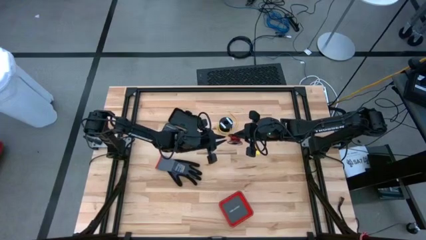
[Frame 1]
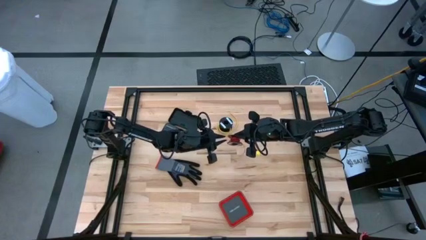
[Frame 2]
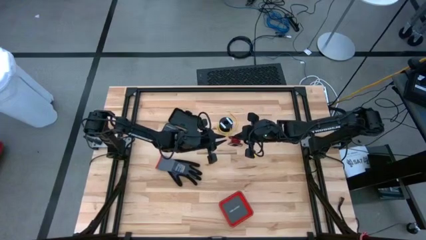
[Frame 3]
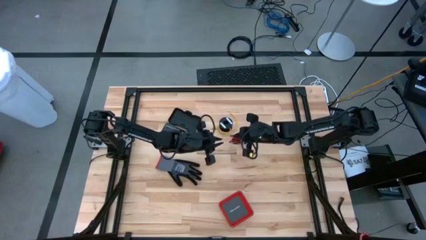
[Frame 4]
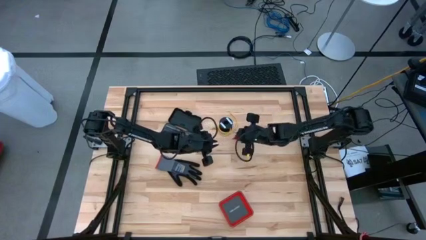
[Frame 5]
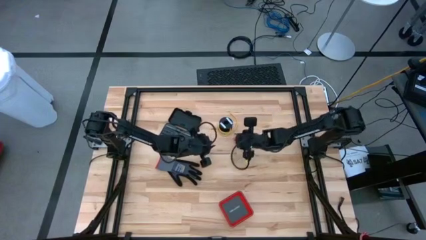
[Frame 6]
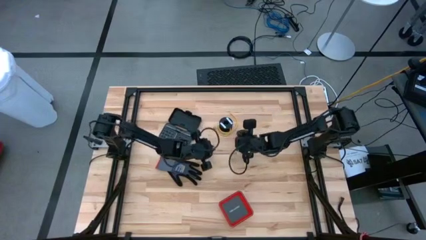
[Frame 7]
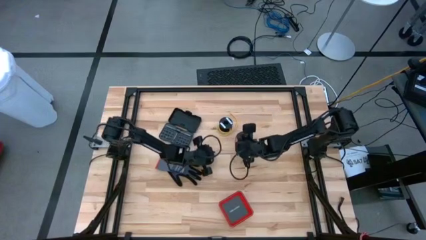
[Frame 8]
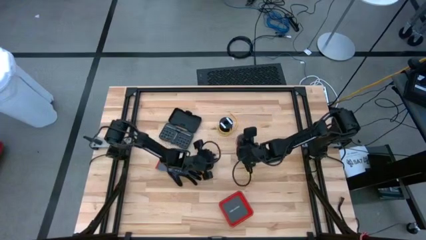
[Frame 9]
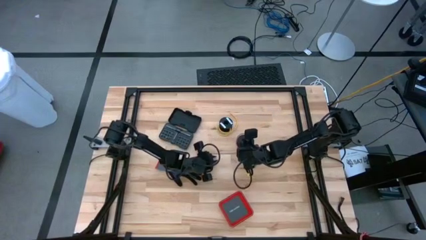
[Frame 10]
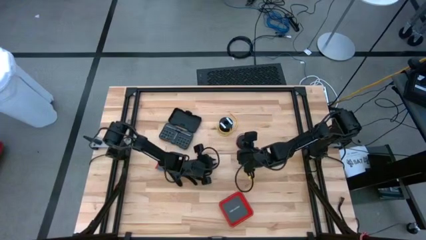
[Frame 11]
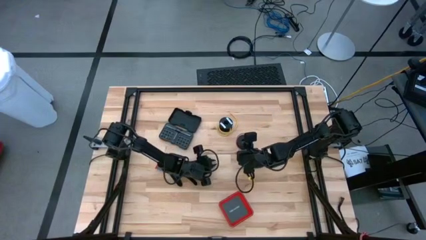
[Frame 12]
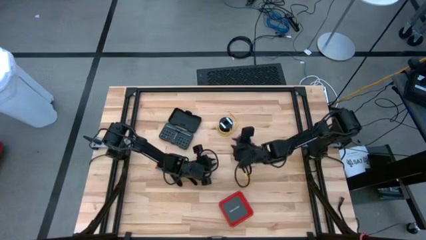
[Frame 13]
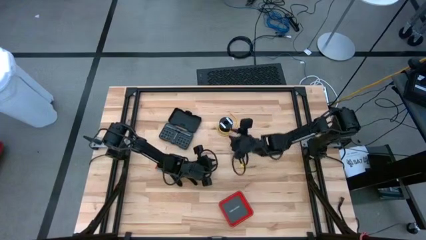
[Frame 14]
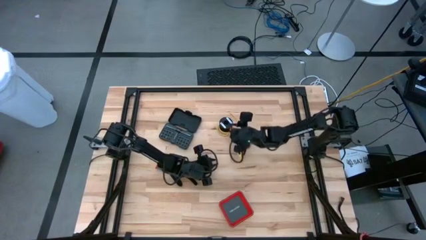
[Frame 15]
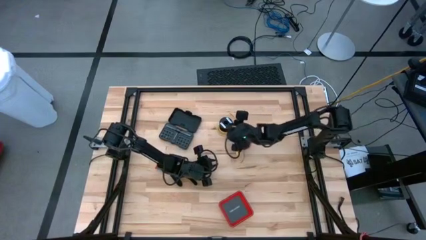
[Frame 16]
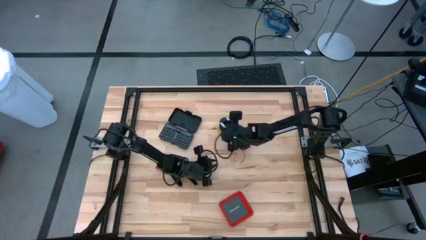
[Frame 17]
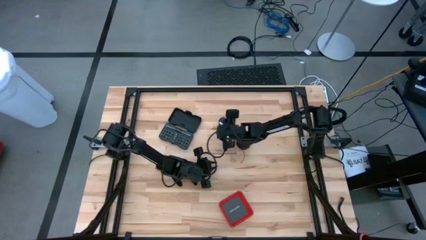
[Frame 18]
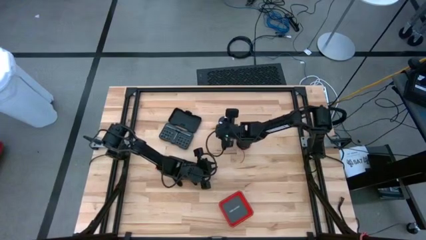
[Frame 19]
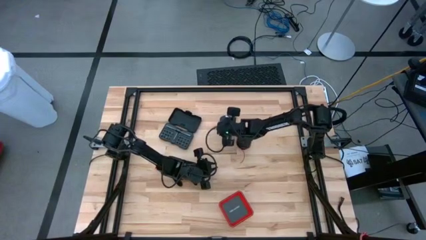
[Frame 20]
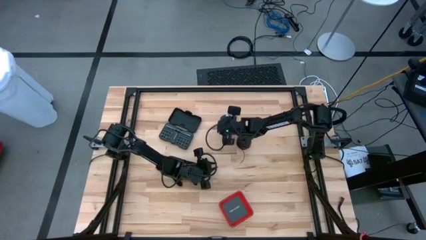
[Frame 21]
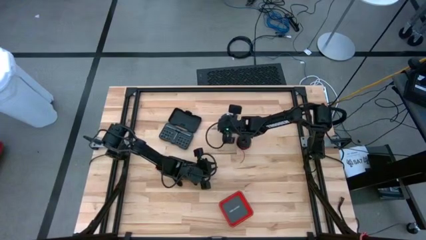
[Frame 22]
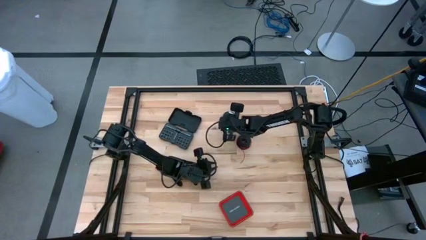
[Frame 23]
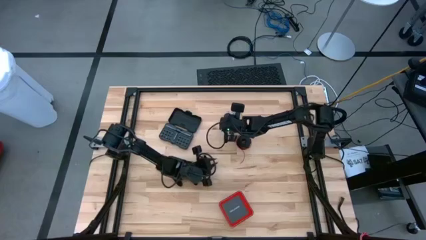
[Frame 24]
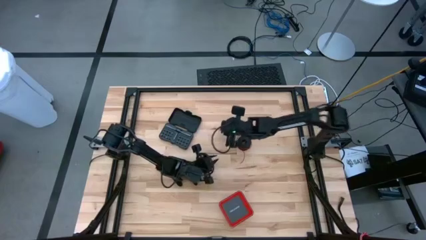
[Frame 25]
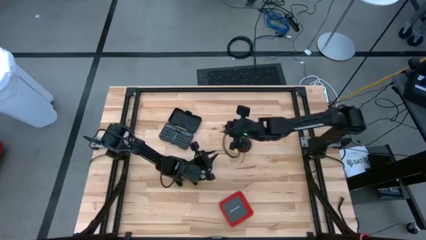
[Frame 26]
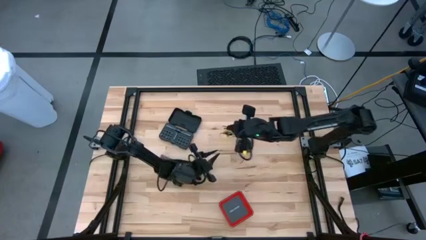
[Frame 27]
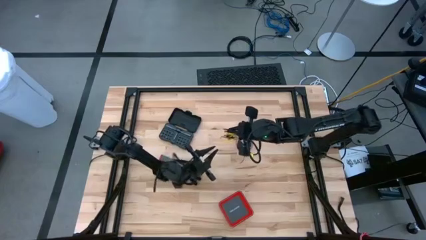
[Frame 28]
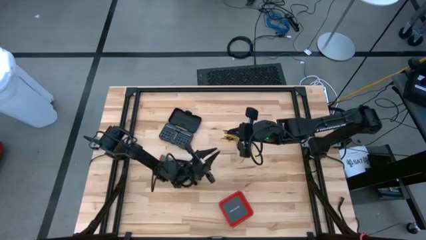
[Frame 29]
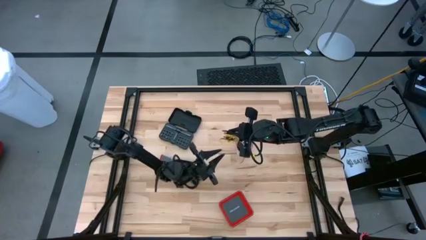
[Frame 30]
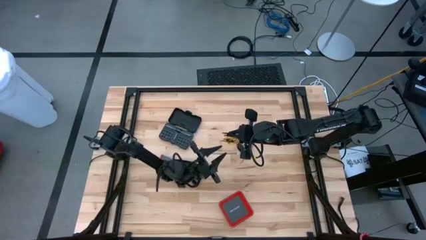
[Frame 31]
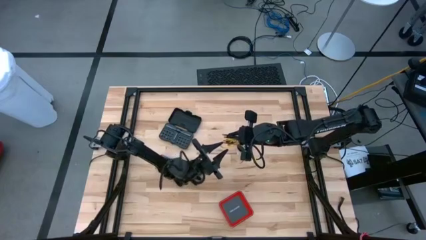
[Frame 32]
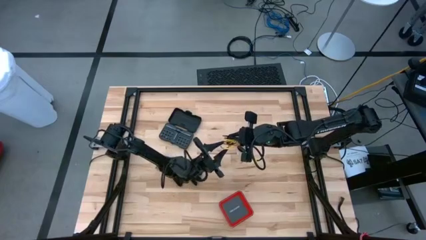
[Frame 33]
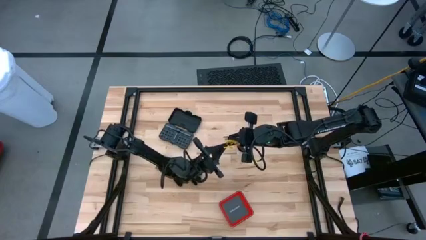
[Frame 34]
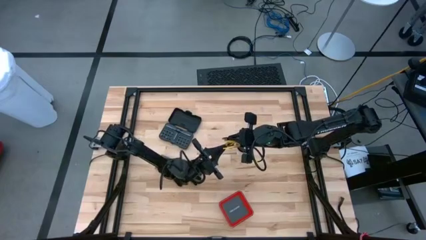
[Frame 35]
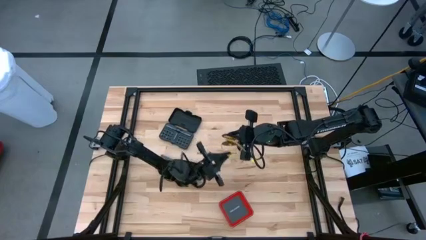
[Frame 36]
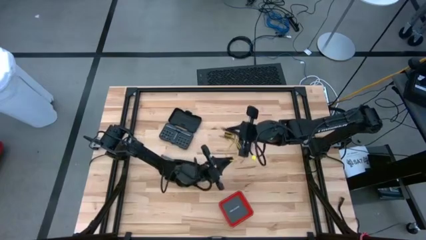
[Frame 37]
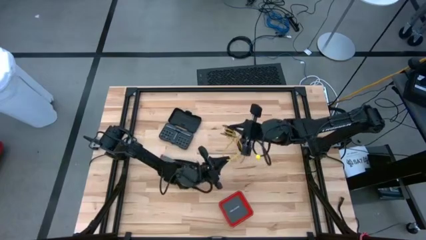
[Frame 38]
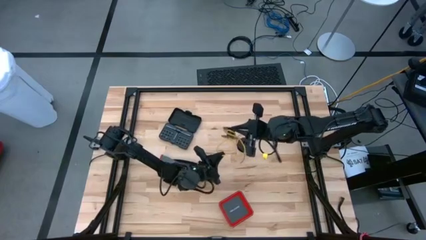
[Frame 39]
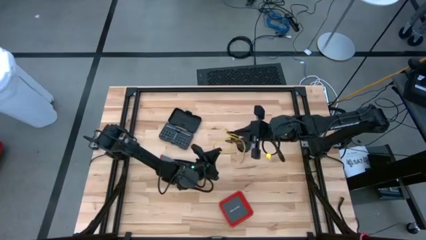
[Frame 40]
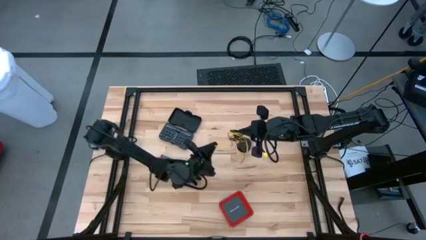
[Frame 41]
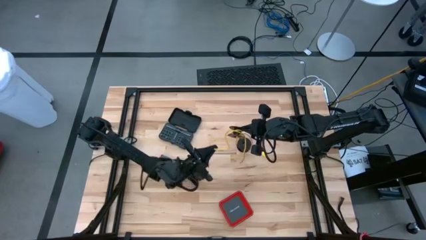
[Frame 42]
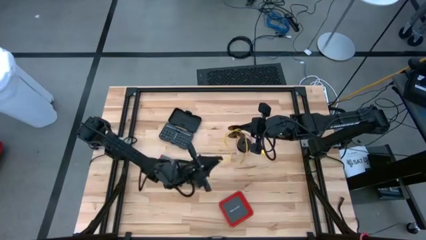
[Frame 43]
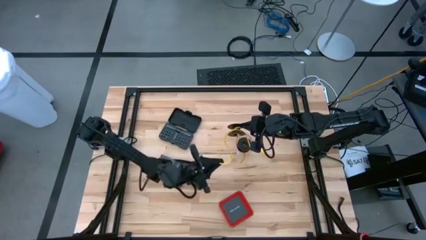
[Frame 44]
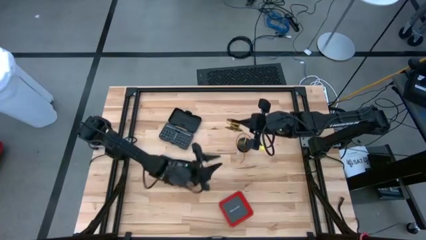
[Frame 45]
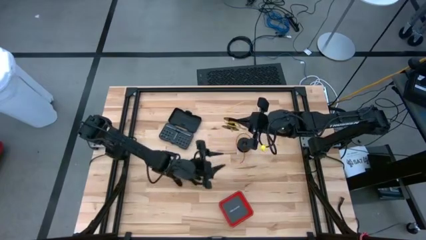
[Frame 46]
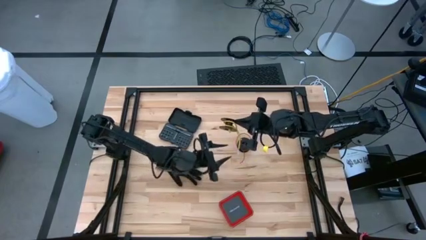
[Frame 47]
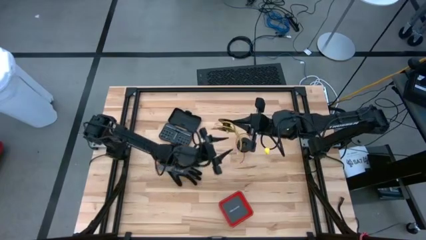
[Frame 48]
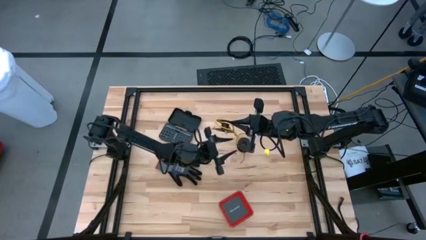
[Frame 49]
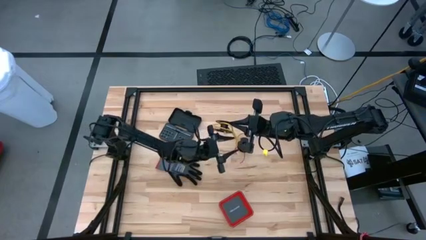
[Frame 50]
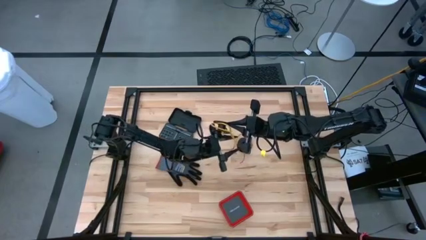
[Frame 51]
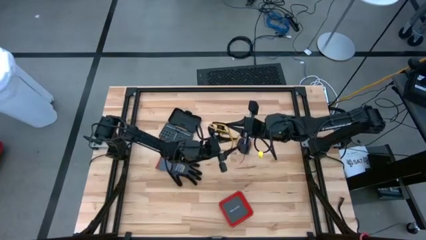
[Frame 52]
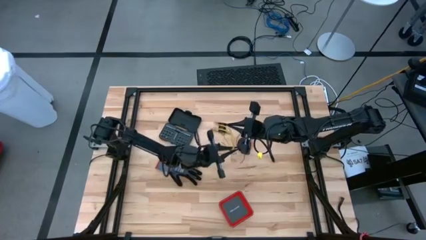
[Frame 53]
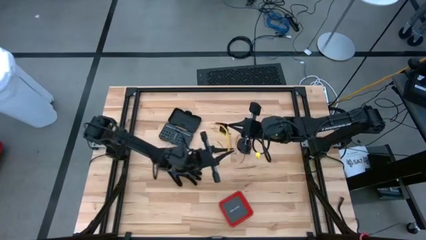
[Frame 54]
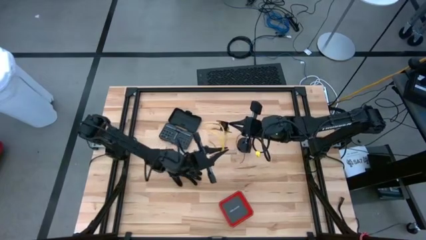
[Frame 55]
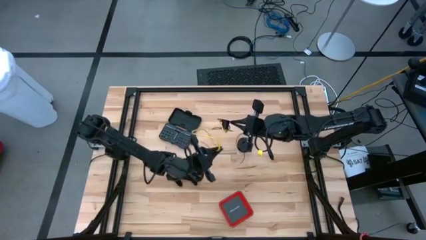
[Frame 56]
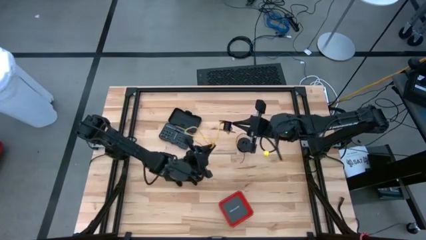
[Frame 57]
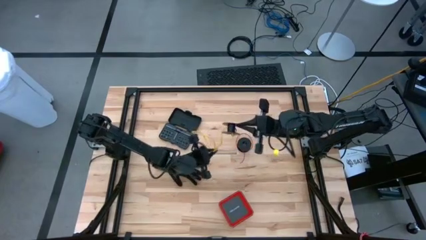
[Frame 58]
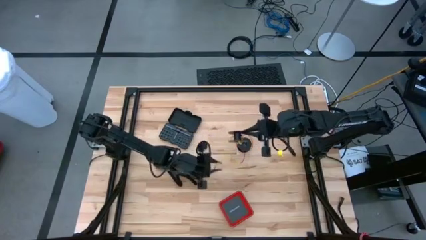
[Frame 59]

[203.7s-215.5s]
Task: Coil cords
Uncoil the yellow wire from the spool
